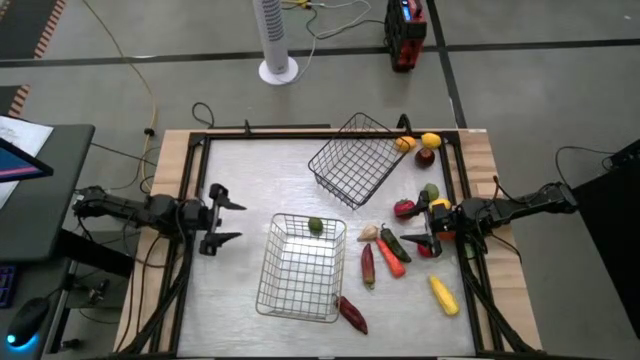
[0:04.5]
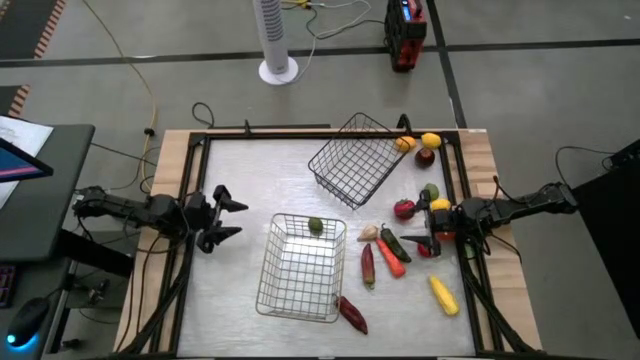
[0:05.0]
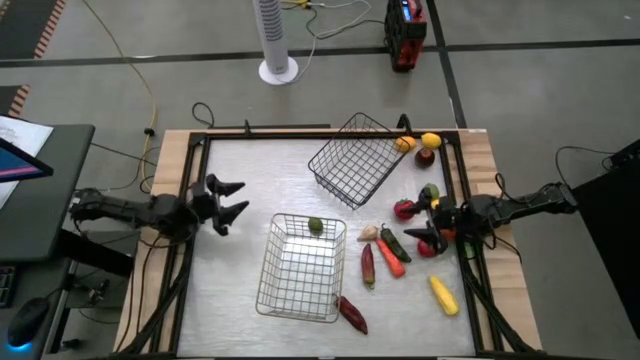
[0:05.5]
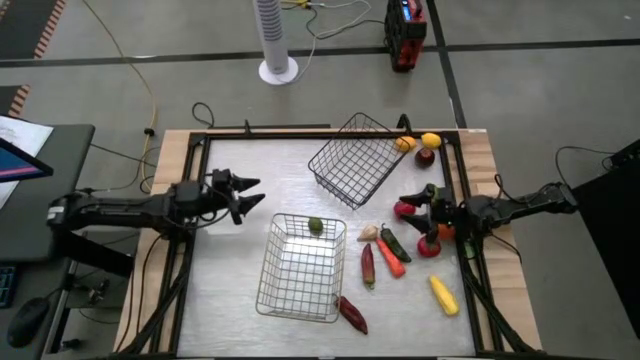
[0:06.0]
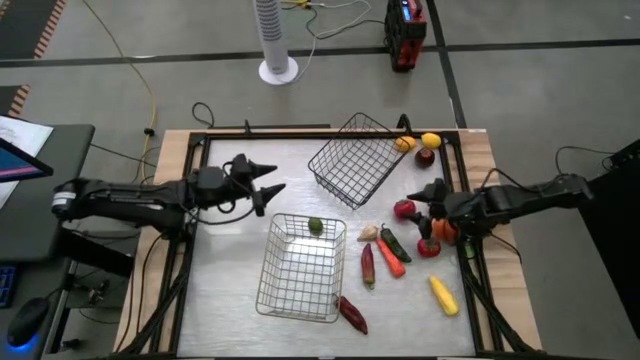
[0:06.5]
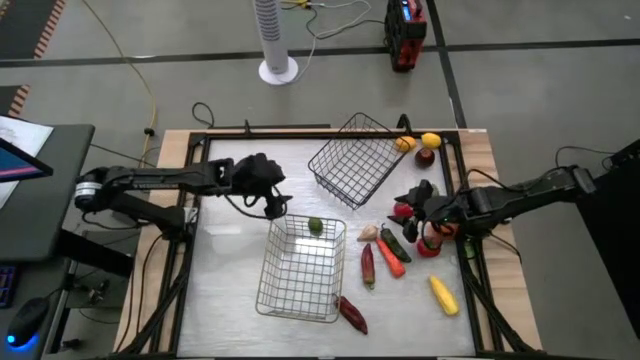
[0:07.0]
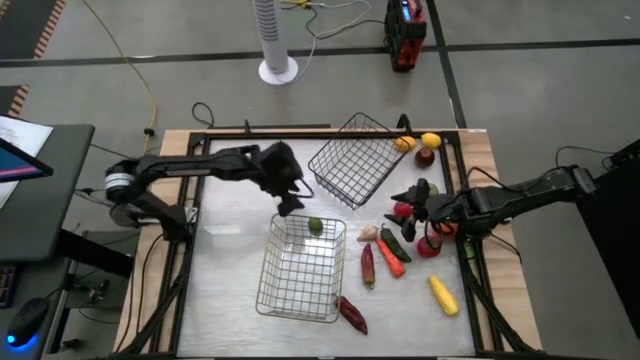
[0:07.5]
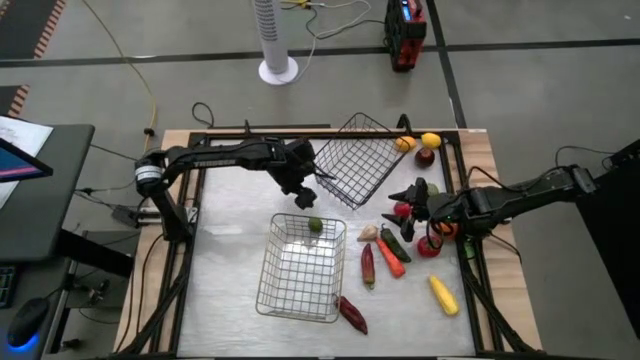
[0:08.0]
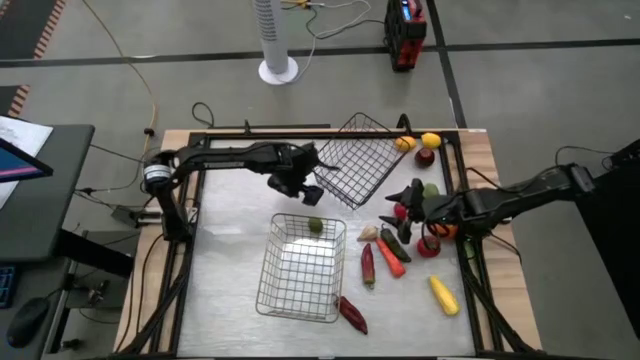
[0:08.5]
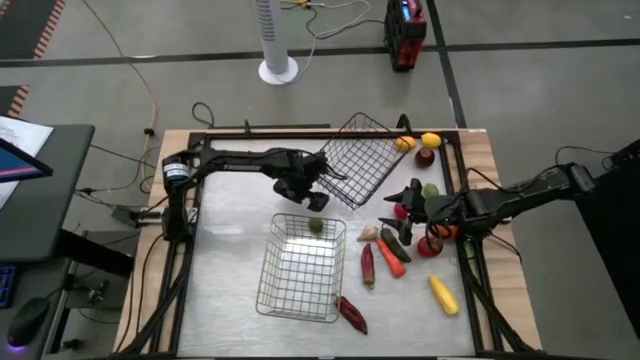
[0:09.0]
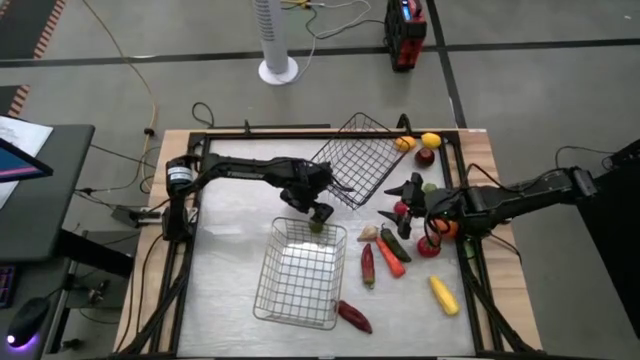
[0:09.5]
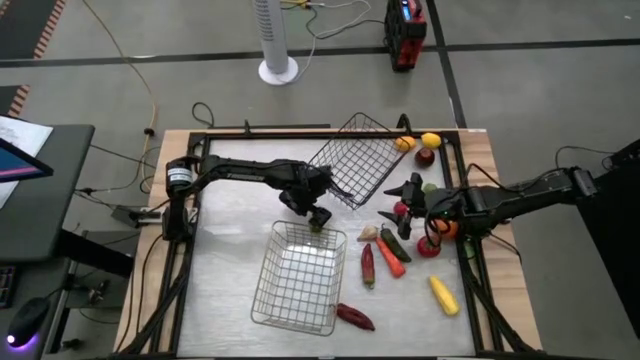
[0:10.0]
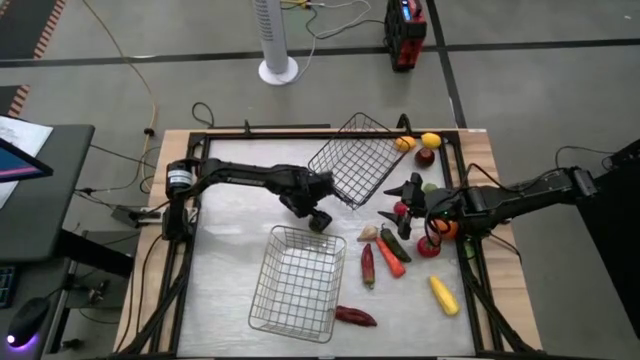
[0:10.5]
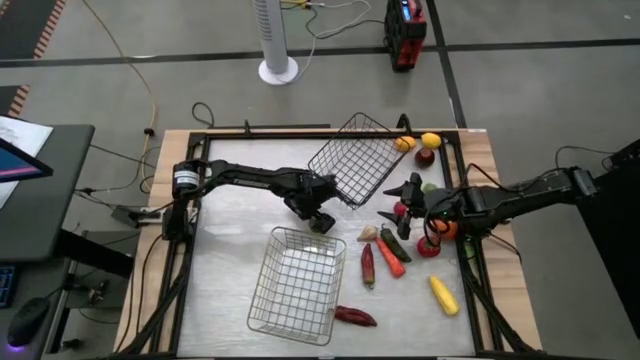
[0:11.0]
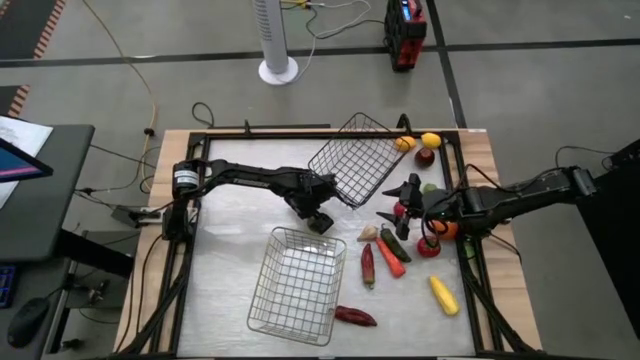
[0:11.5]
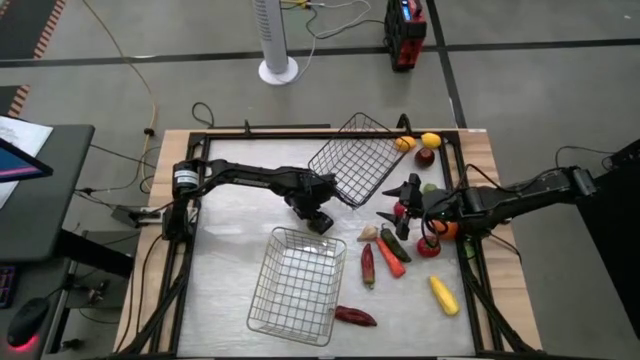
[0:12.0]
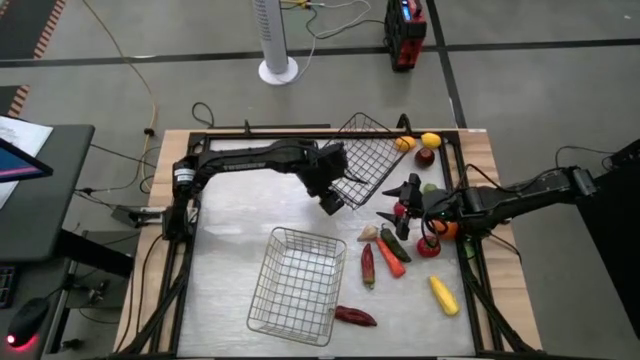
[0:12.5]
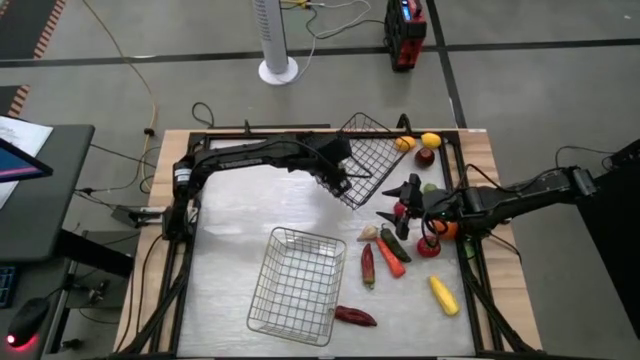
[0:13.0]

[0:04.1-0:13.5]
Task: Sort produce into baskets
Put the left green lime into the black wire basket

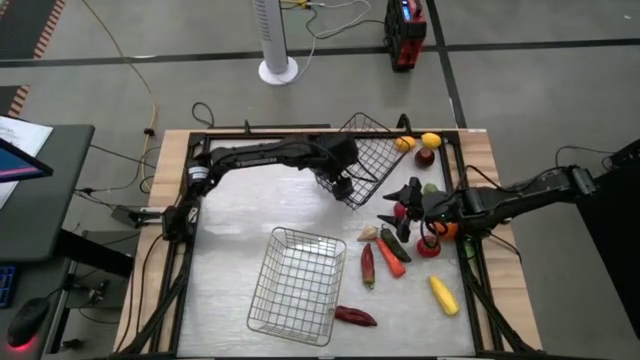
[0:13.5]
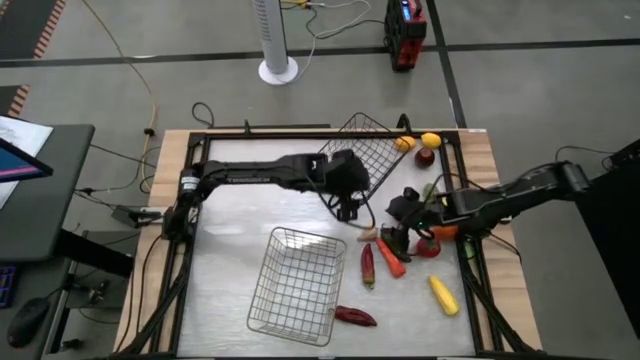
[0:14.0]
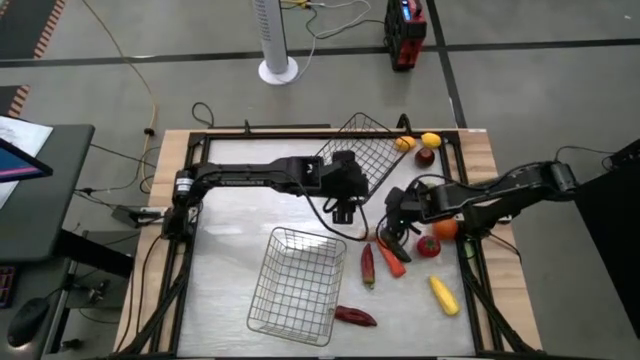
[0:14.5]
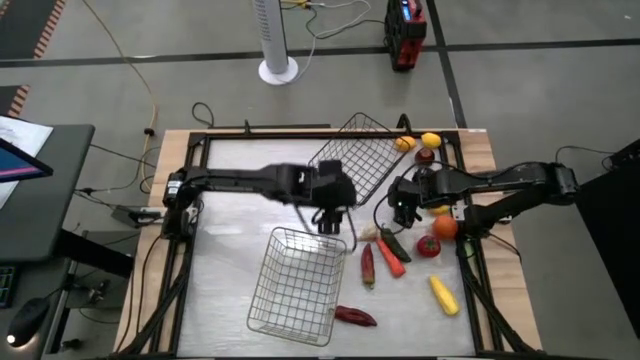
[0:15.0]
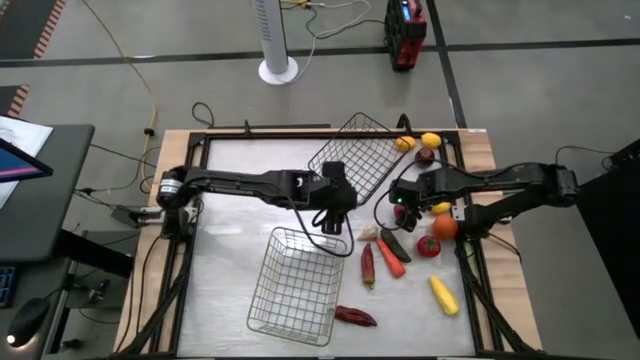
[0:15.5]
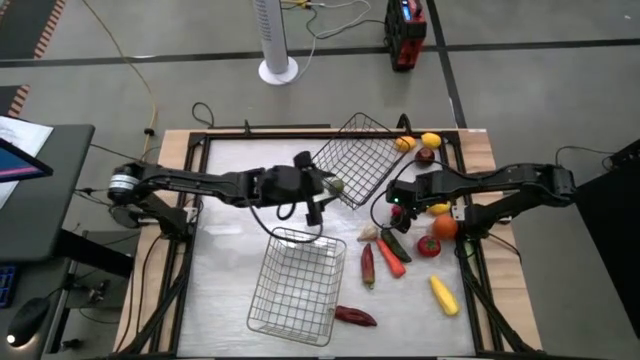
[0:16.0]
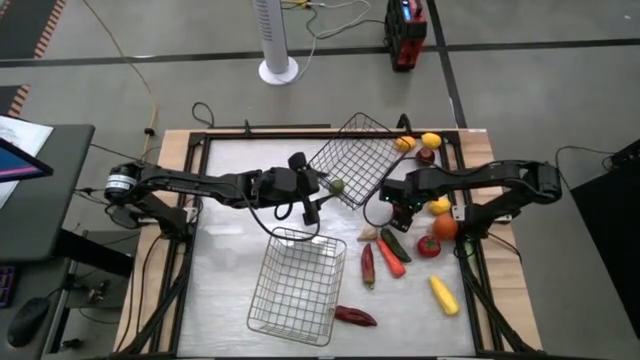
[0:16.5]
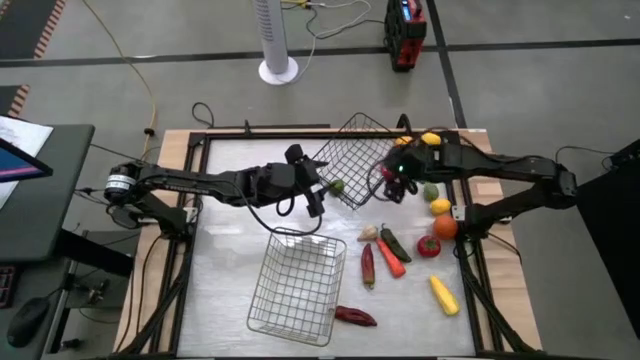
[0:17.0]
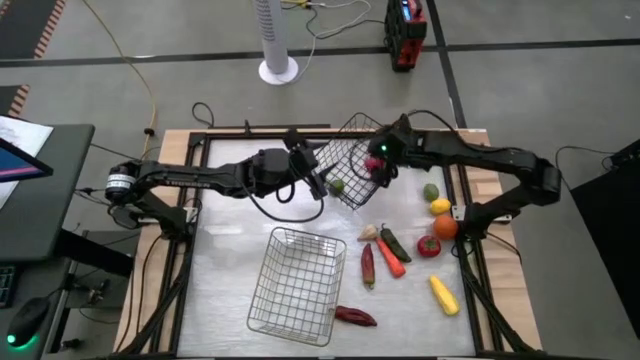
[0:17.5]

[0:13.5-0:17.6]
Put the top red tomato into the black wire basket

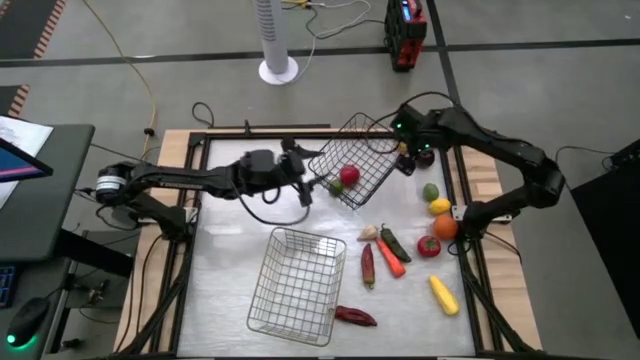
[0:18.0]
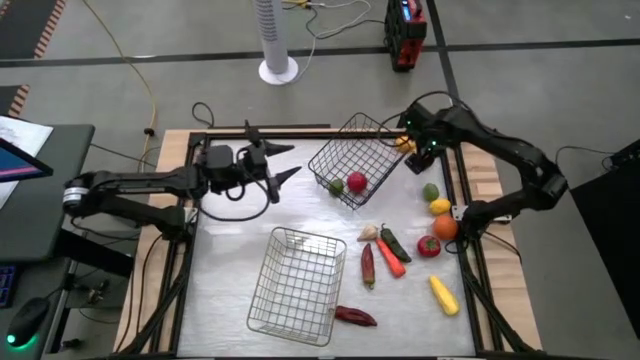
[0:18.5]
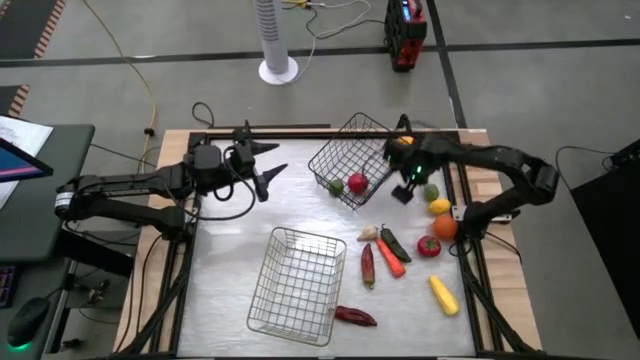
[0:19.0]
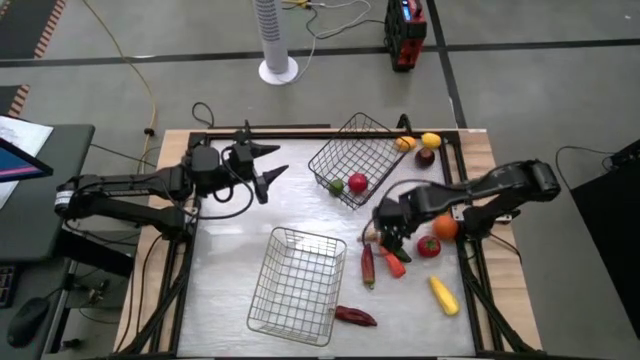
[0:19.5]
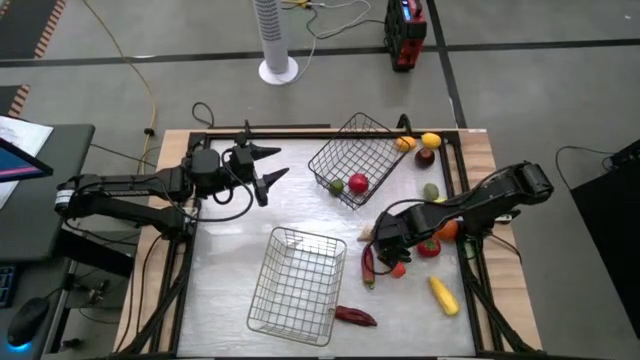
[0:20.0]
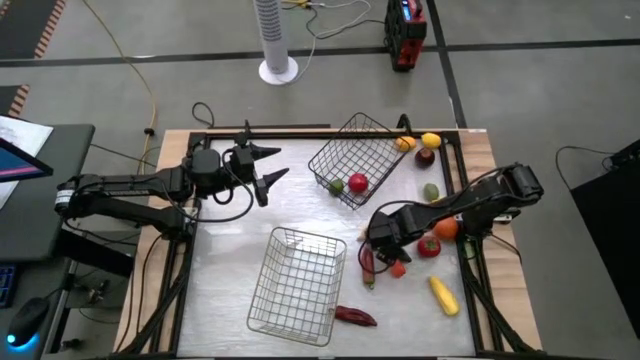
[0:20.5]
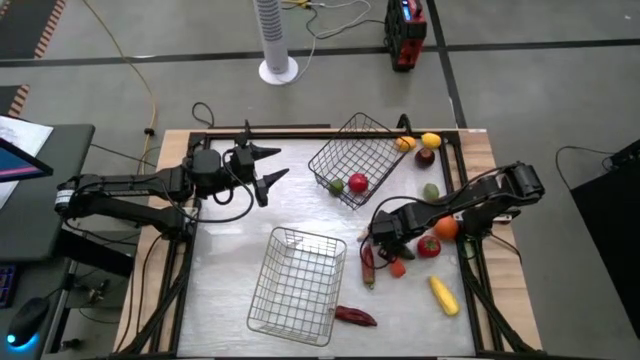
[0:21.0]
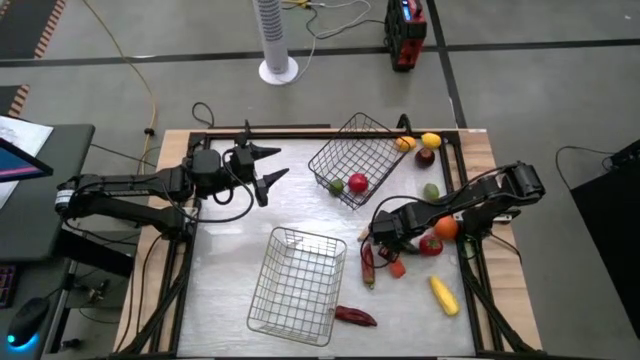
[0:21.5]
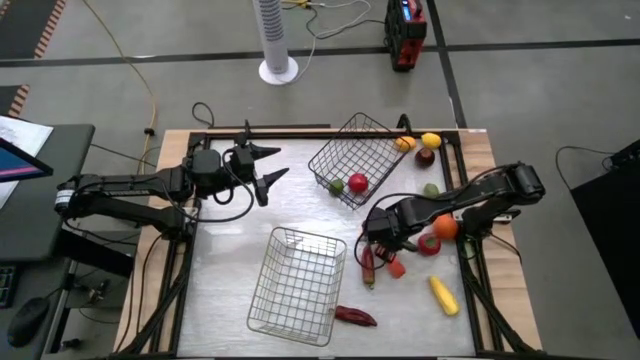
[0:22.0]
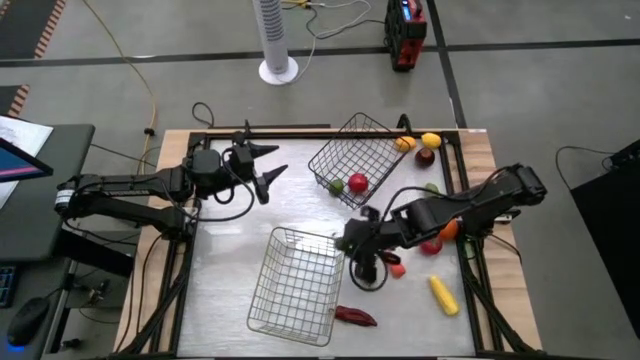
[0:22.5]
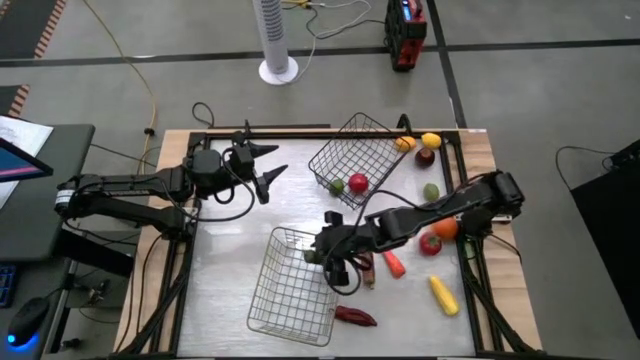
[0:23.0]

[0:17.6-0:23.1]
Put the green chili pepper into the gold wire basket

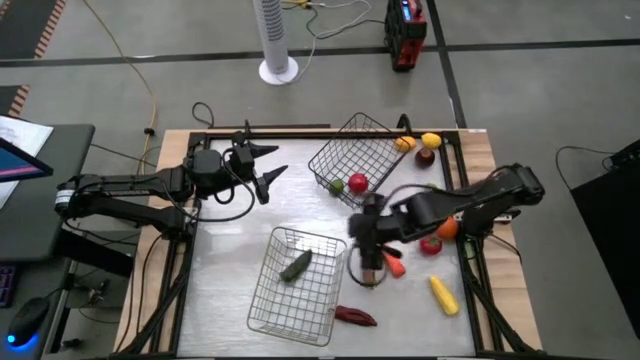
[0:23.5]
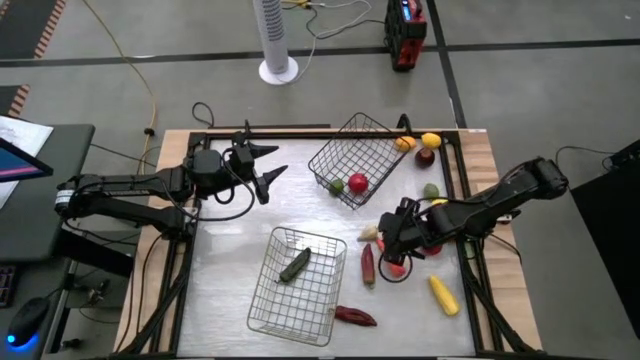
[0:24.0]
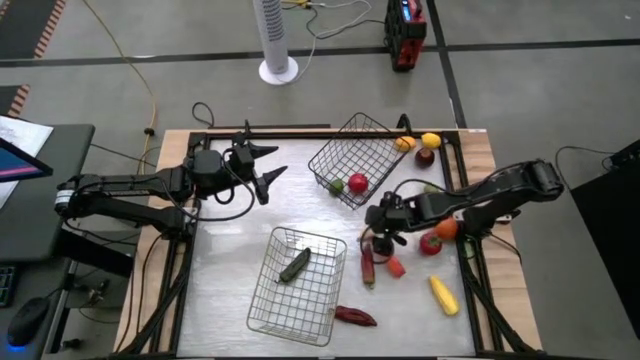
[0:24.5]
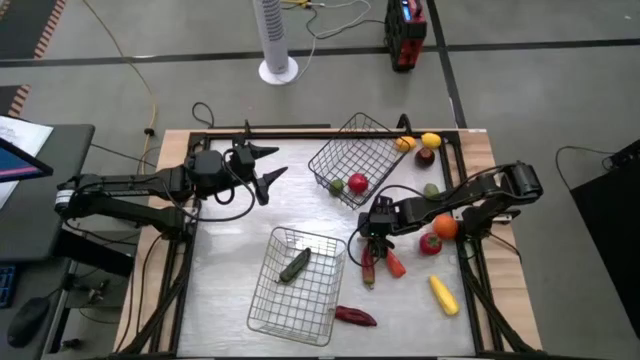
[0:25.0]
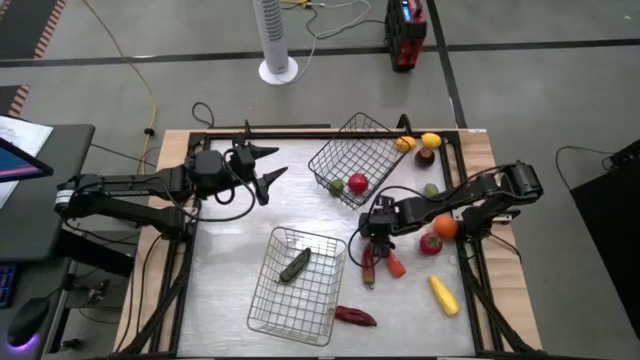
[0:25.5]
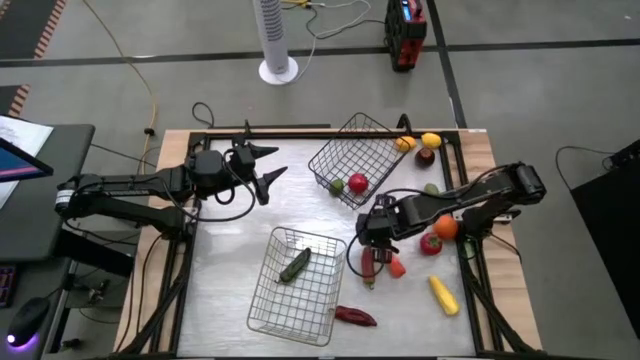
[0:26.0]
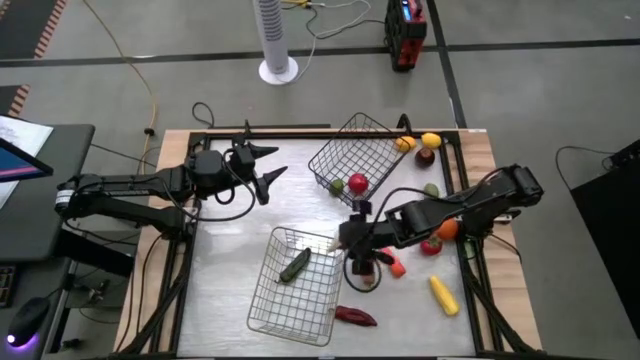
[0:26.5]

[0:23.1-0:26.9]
Put the white garlic into the gold wire basket
